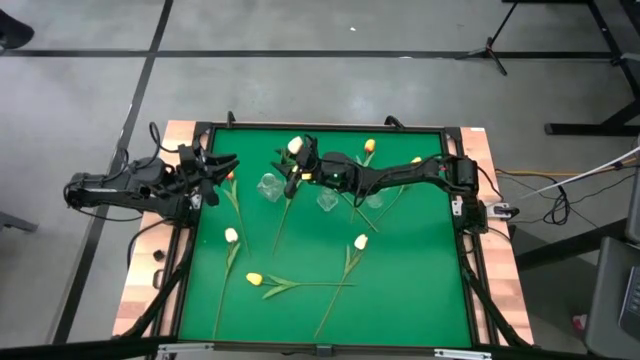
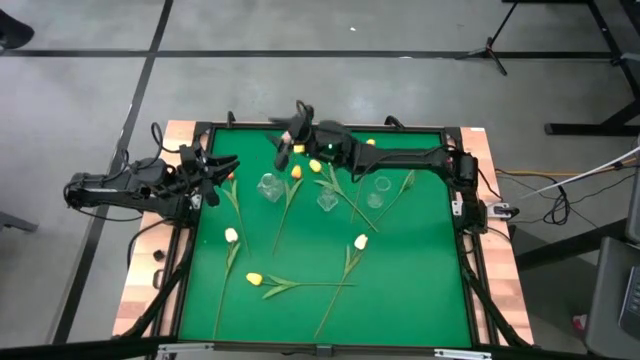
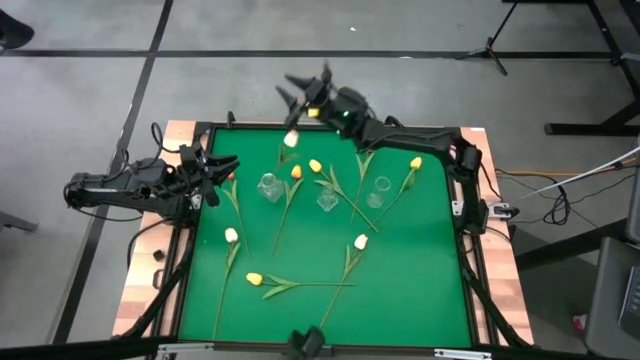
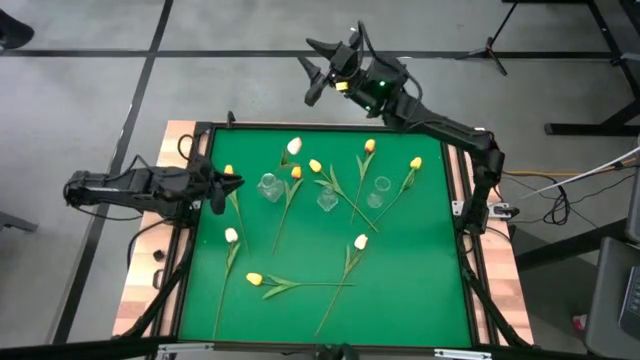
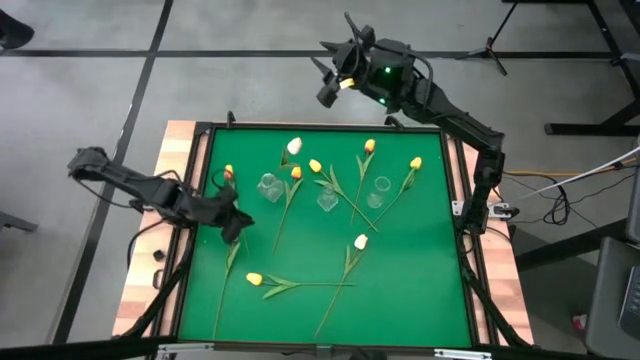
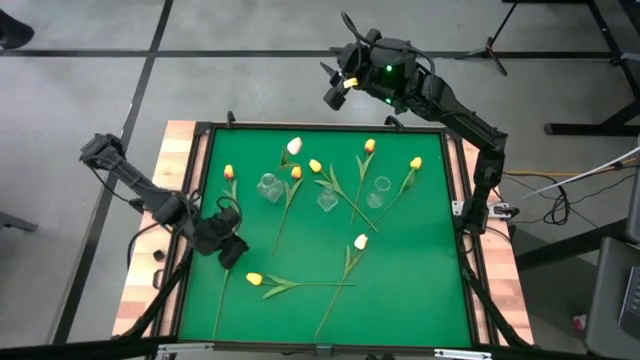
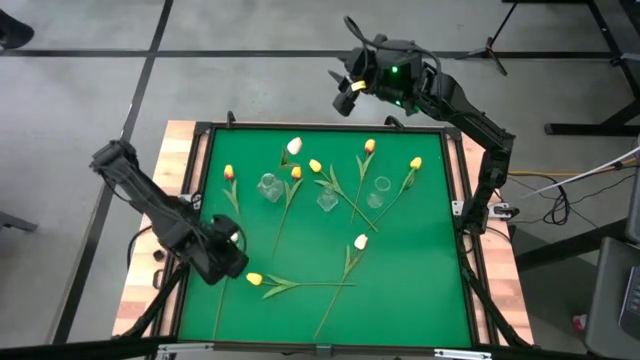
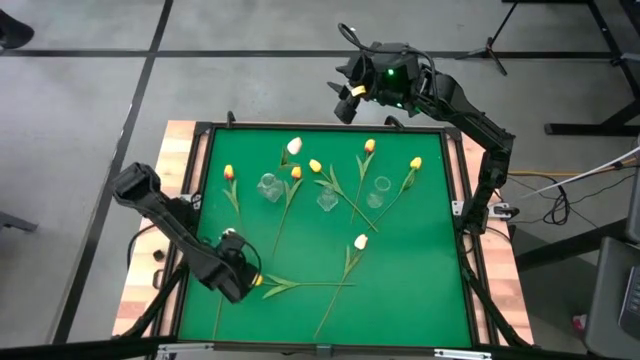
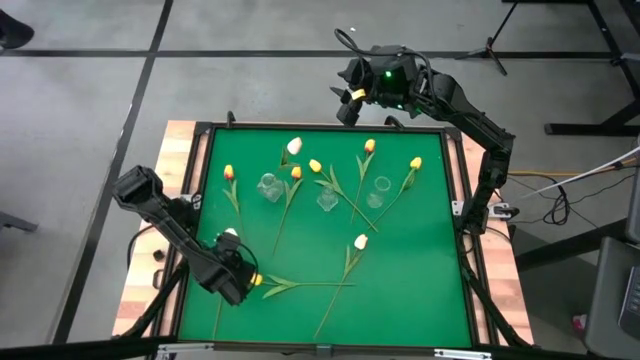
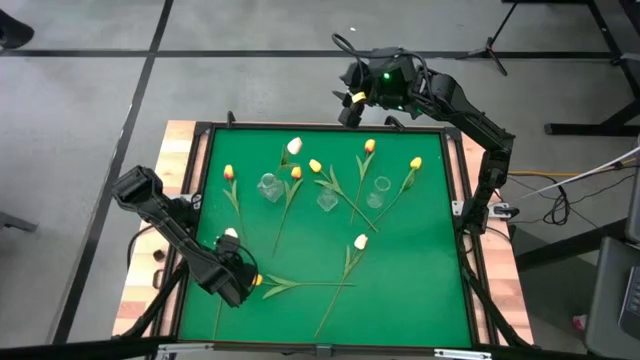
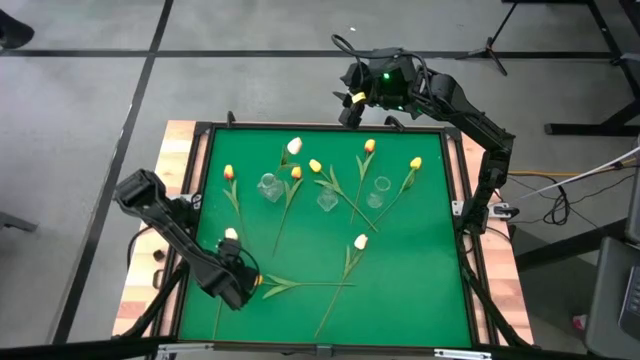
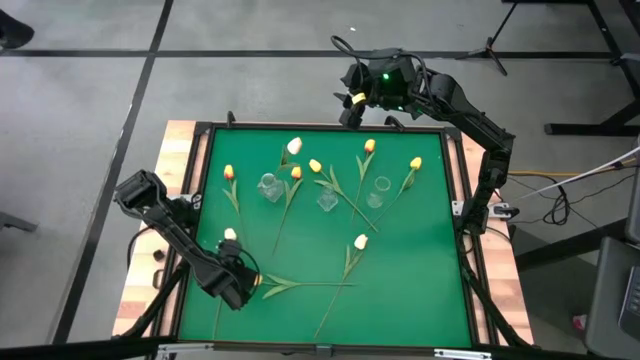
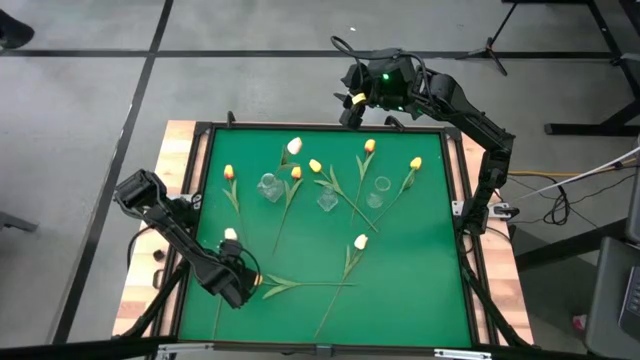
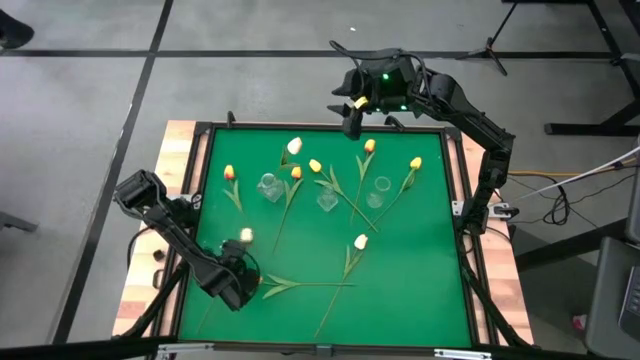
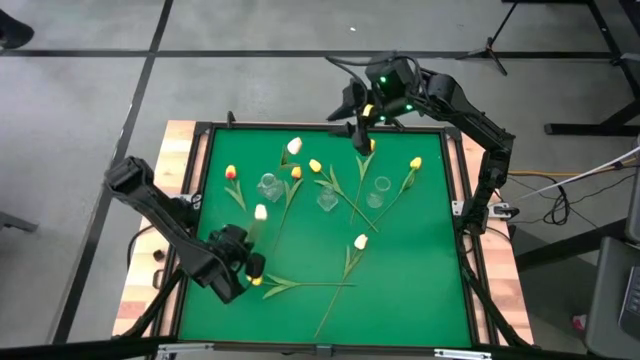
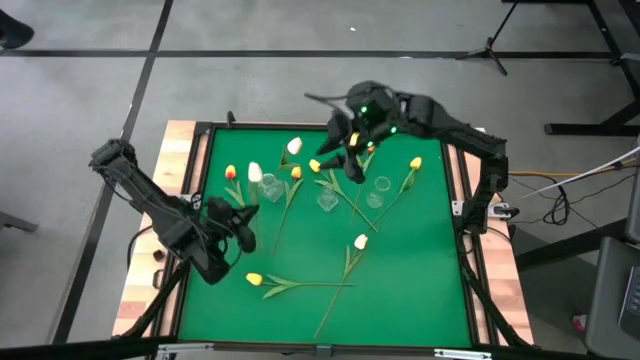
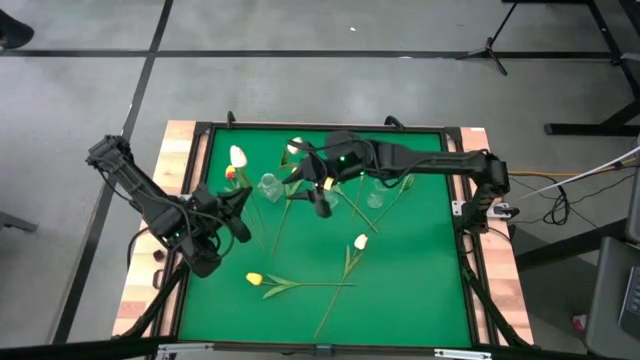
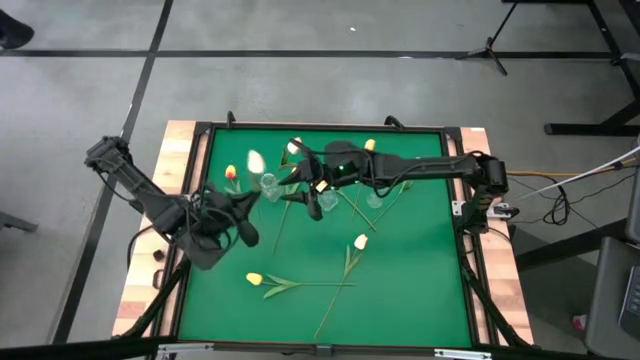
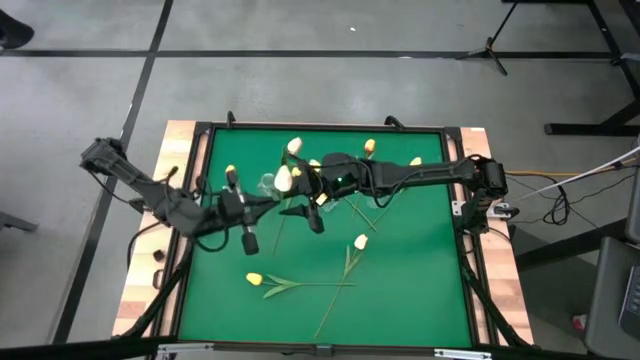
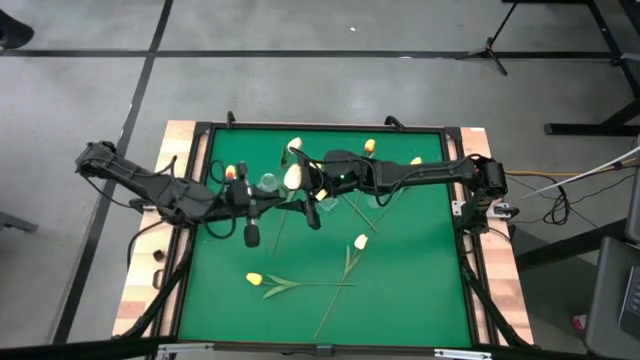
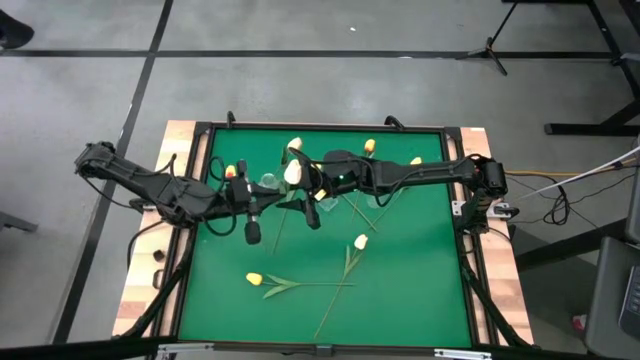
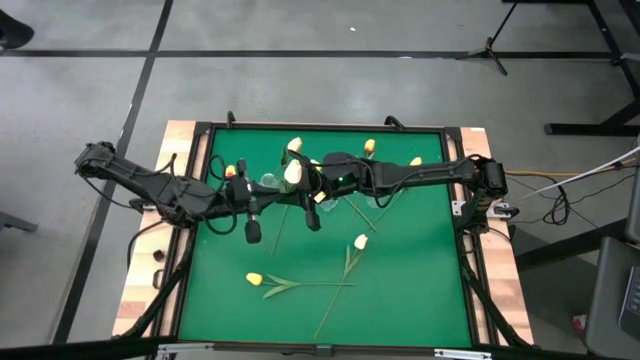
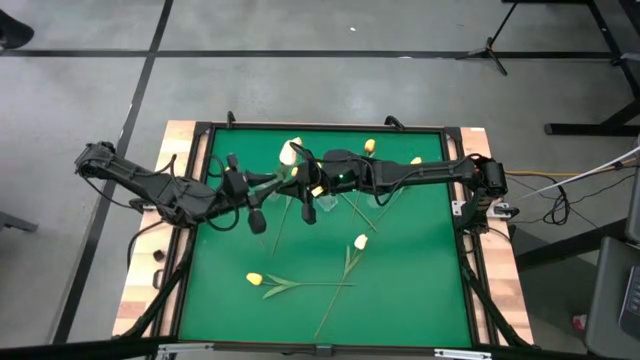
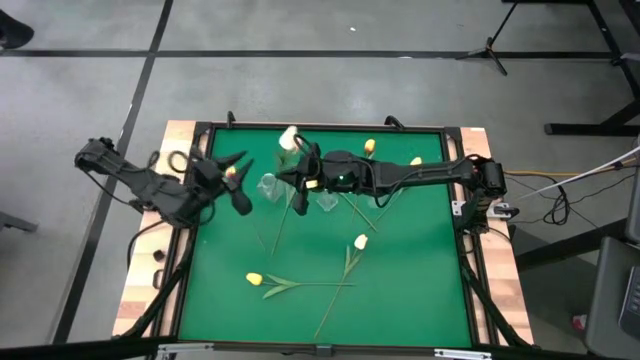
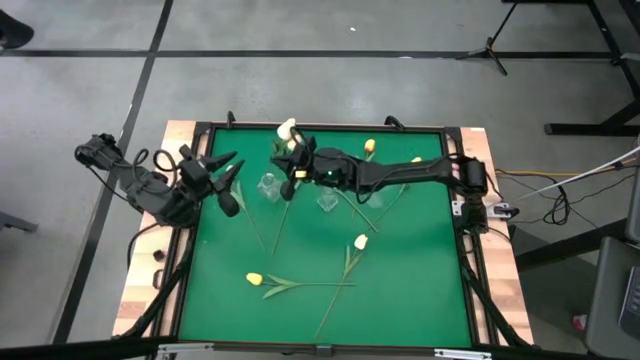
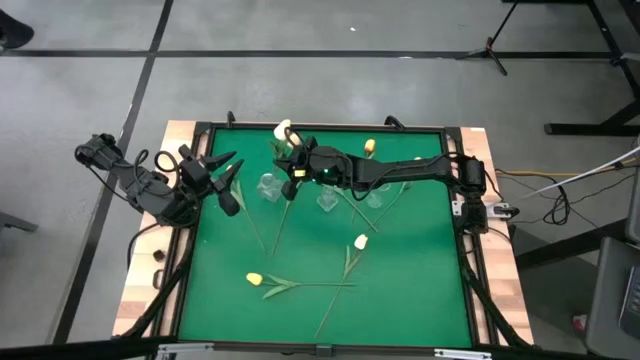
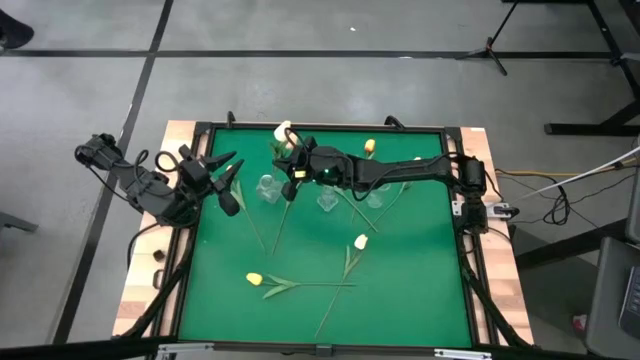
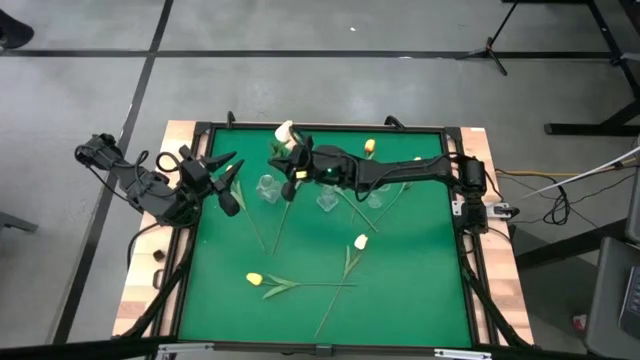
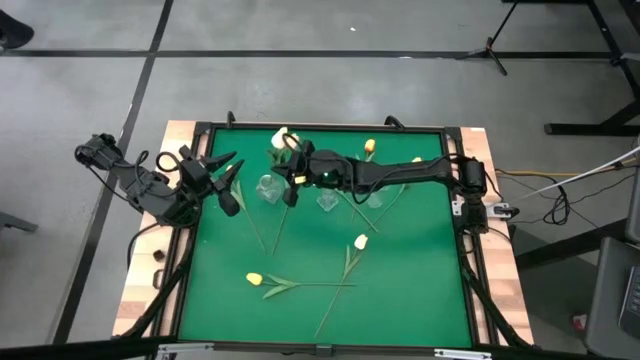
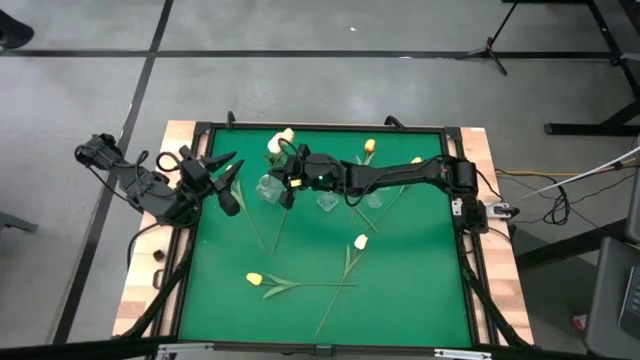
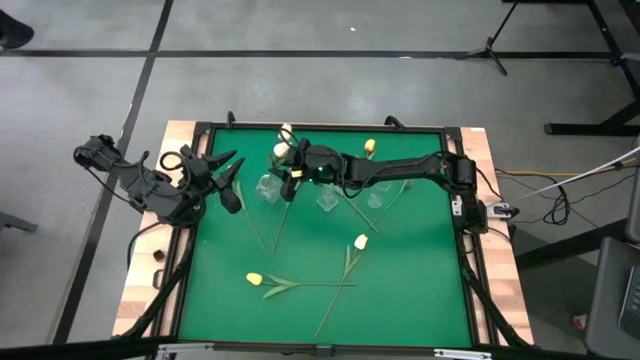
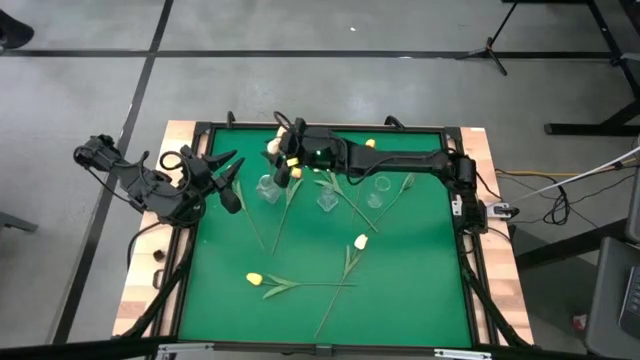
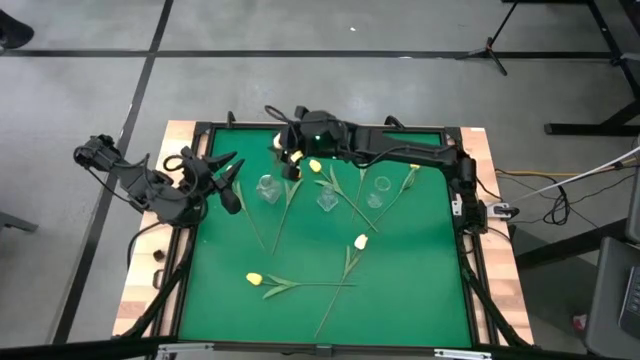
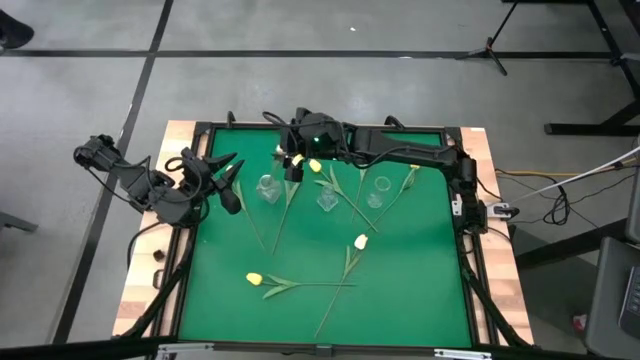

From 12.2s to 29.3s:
Task: Sort flowers into vase by color
Put the left light yellow flower into the left transparent vase

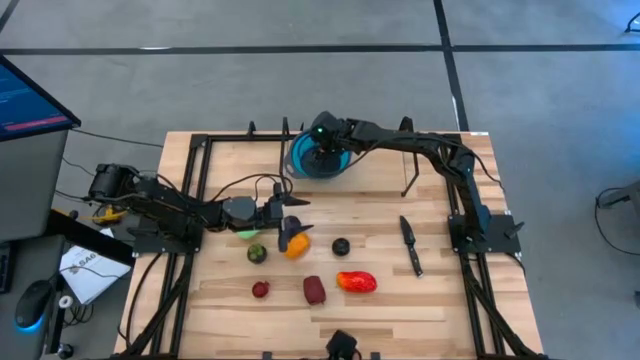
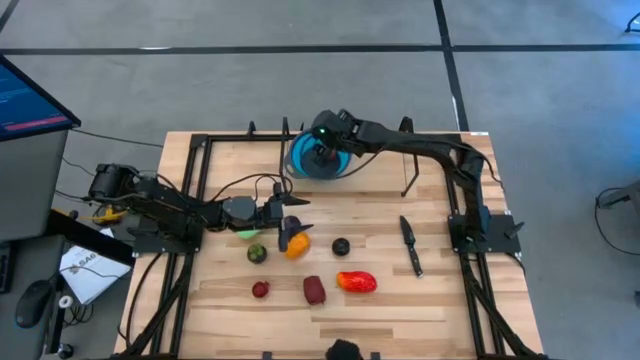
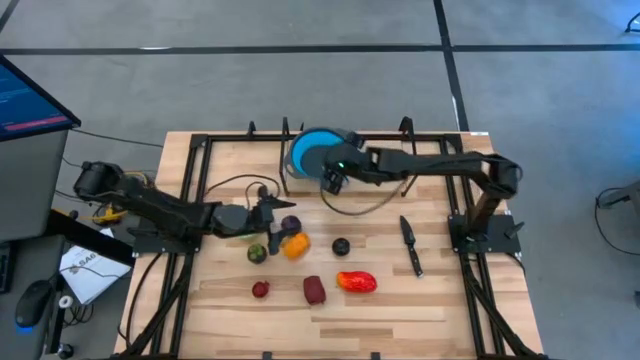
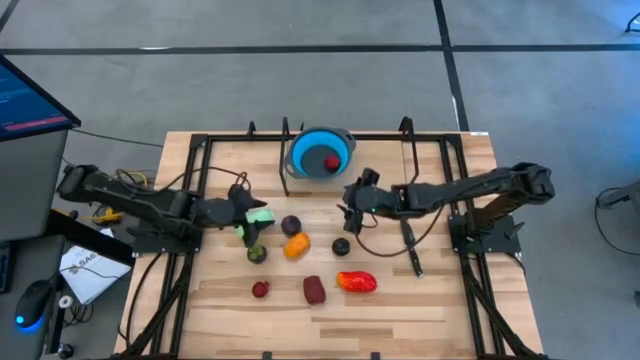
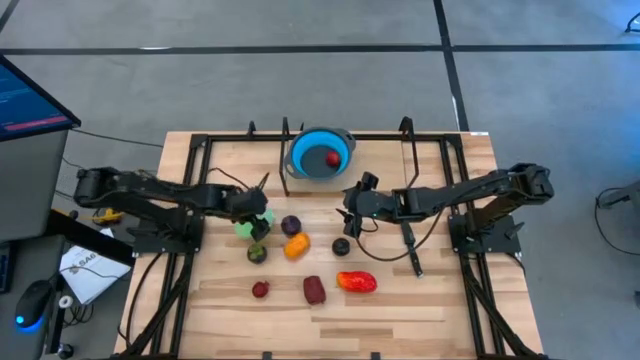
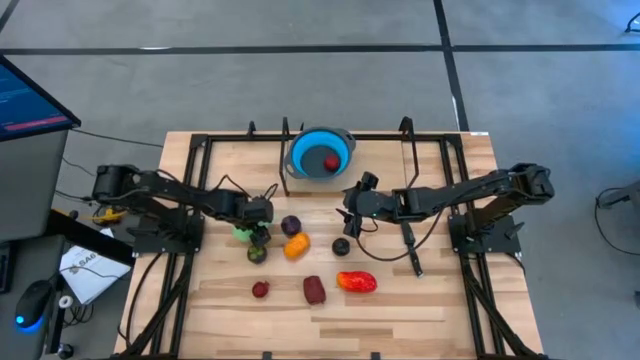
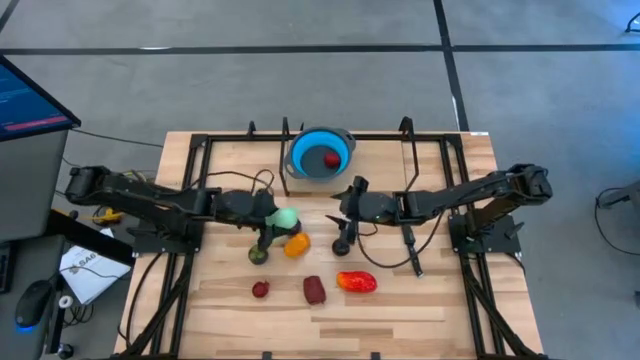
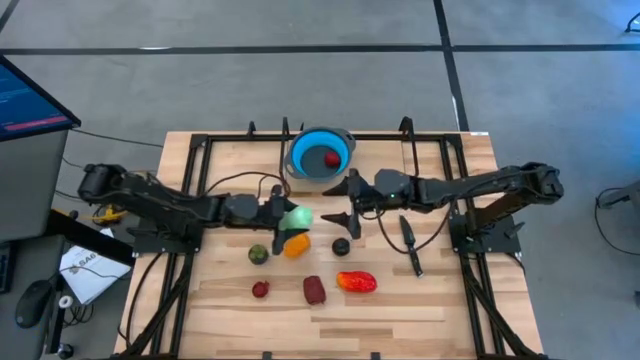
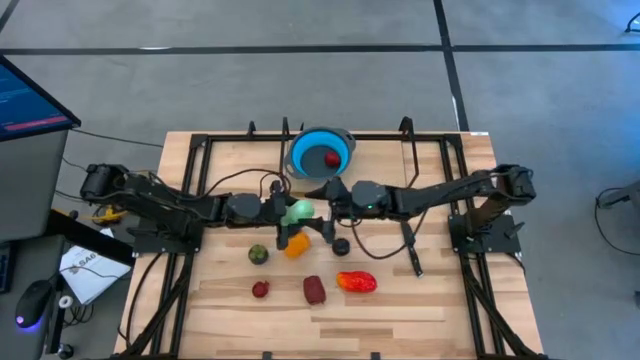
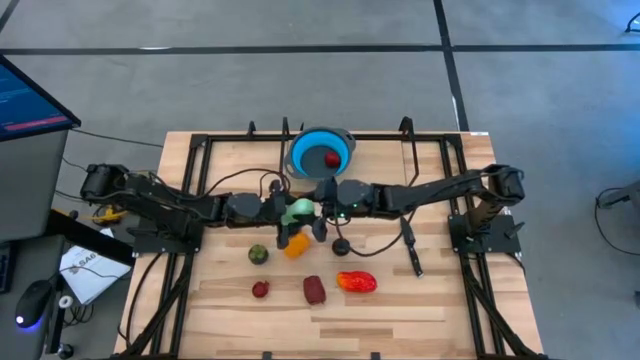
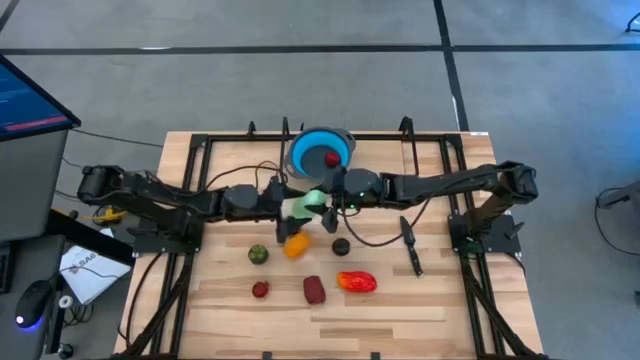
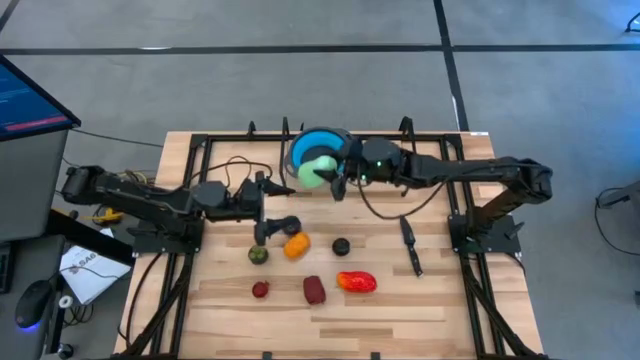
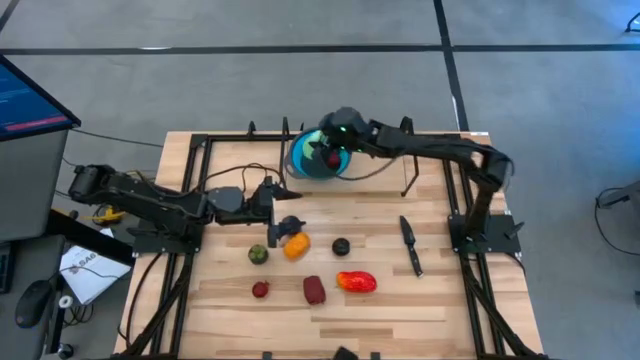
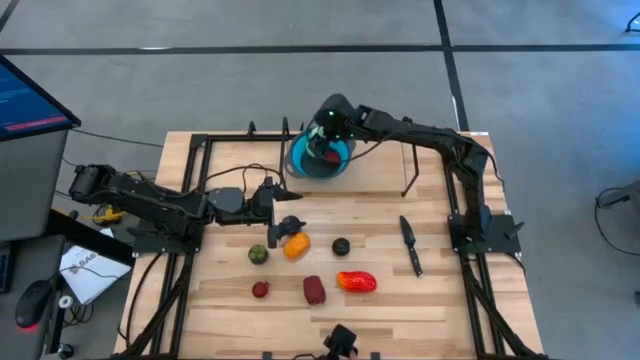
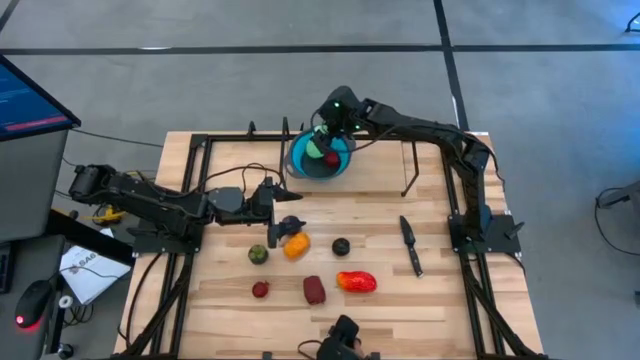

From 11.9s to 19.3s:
Task: Pick & Place Fruit
Put the green lettuce into the blue strainer bowl on the shelf
